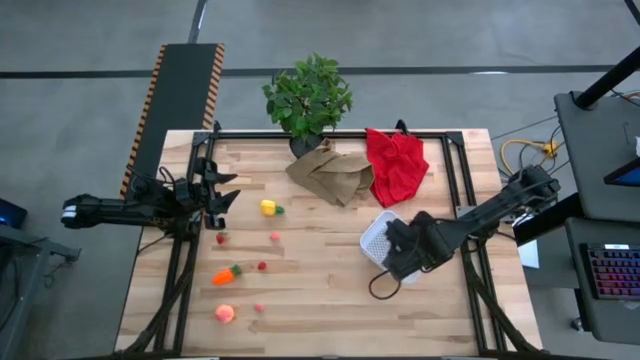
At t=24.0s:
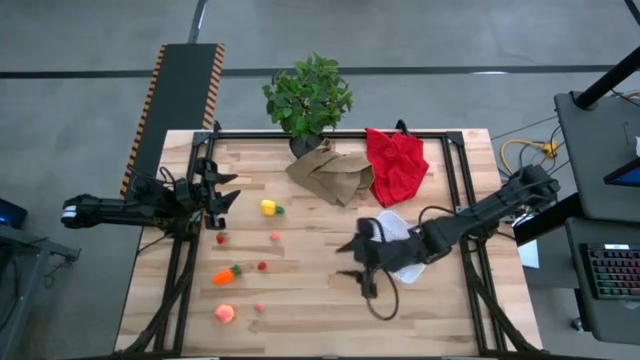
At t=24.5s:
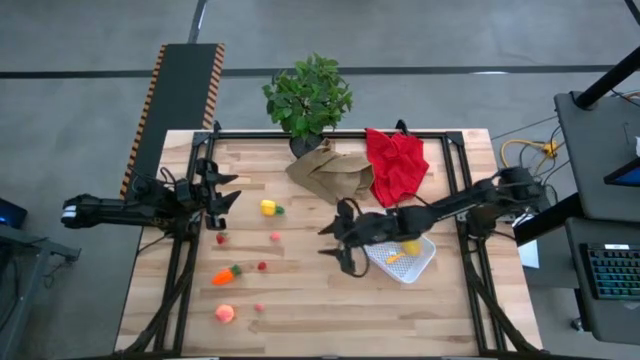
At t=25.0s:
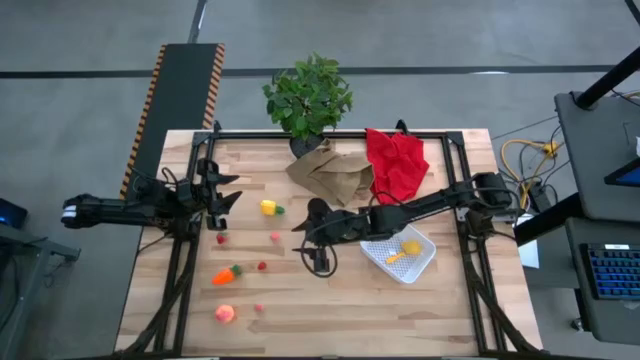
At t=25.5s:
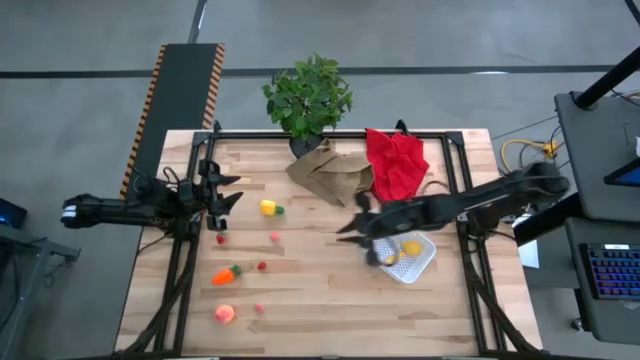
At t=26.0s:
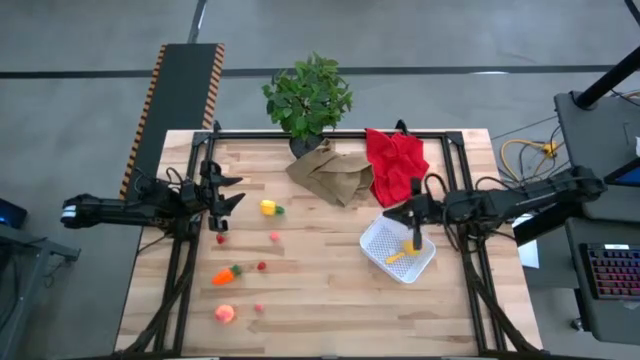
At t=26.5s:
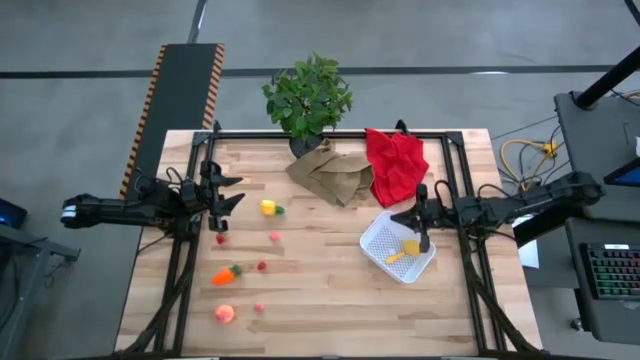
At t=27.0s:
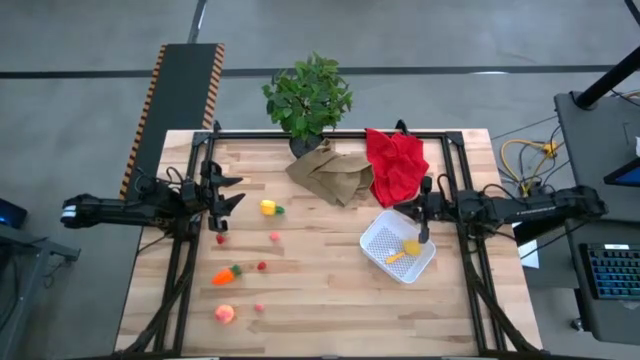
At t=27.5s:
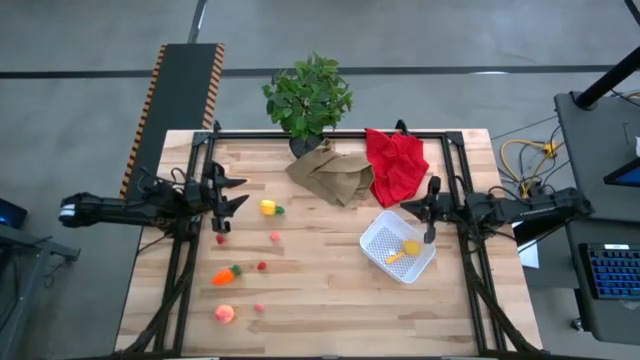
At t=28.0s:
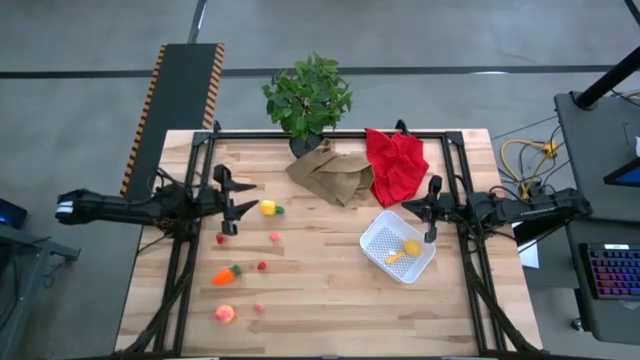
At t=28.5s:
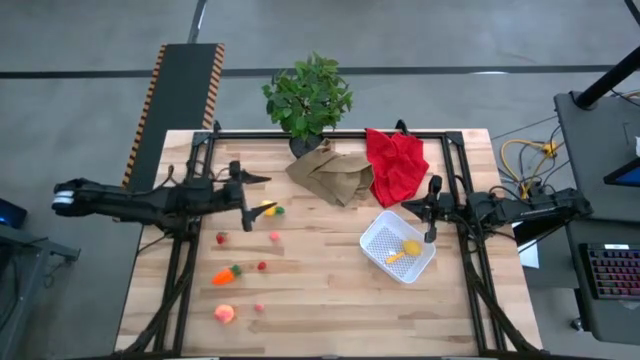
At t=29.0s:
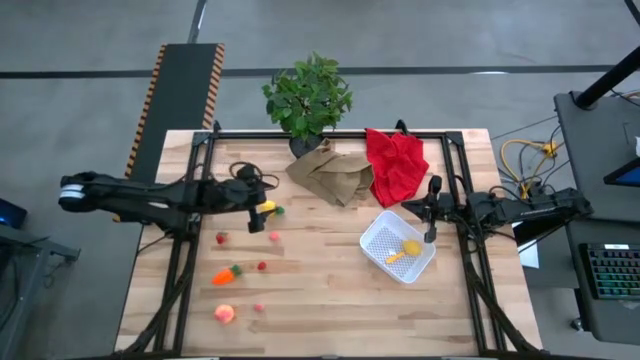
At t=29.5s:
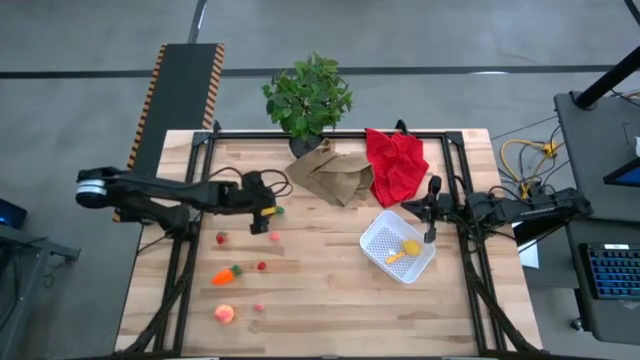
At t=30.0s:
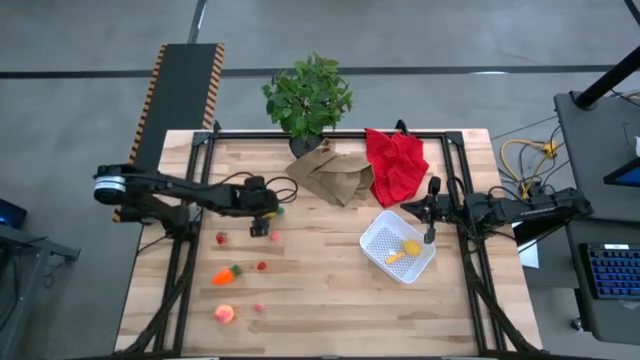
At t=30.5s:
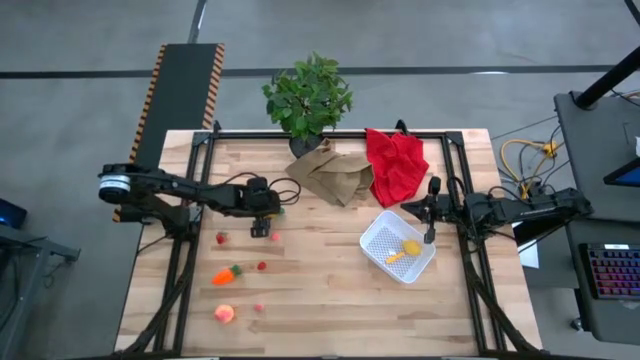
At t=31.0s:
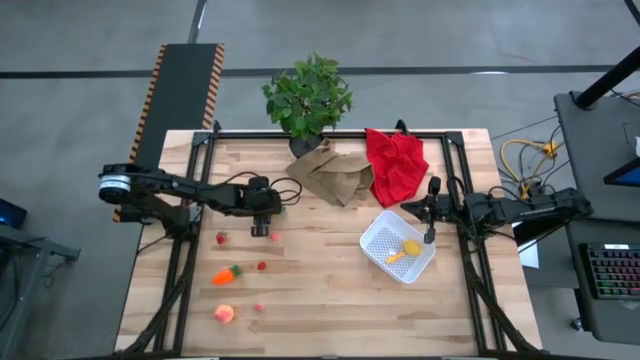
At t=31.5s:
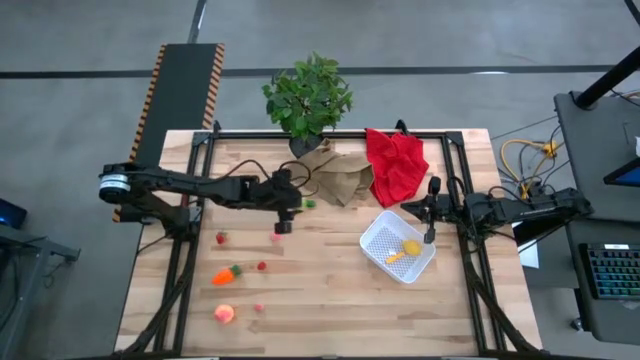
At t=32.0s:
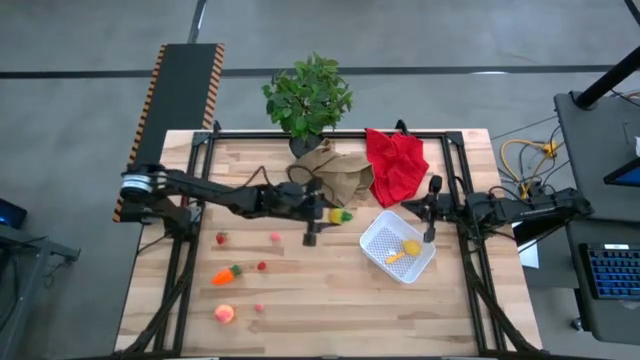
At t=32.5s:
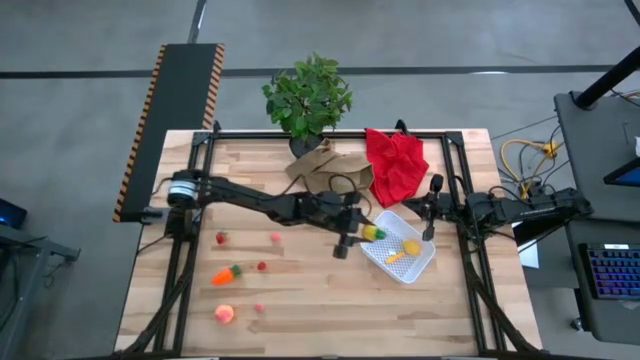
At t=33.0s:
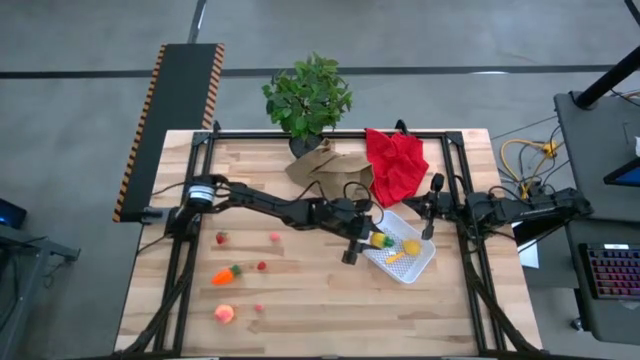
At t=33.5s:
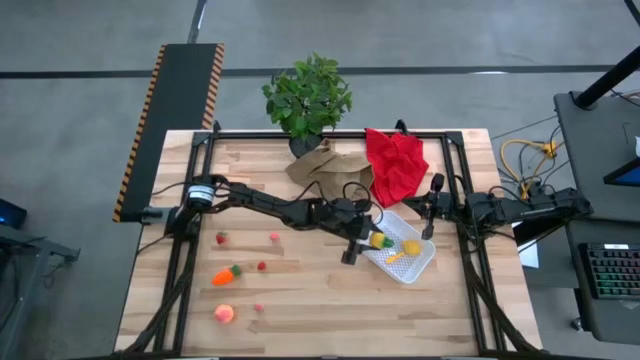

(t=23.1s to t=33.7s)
Task: Pick and placing Produce into tupperware
Put the yellow pineapple into the white bin

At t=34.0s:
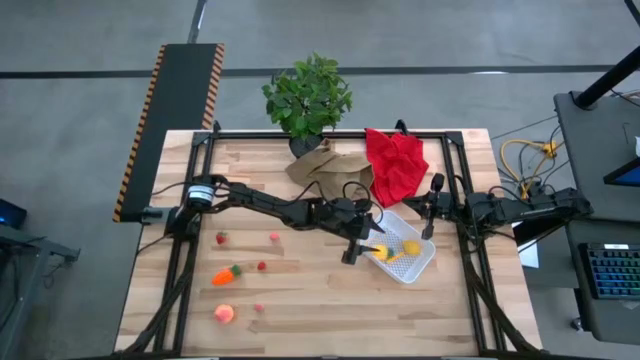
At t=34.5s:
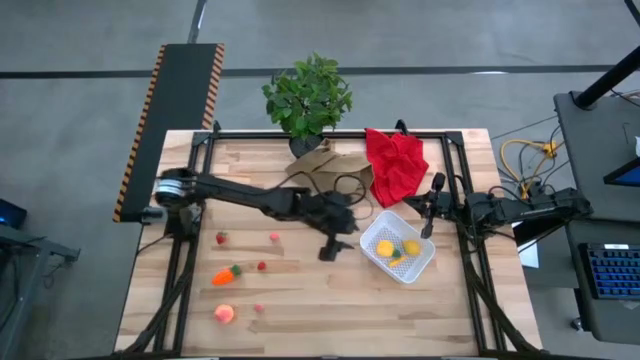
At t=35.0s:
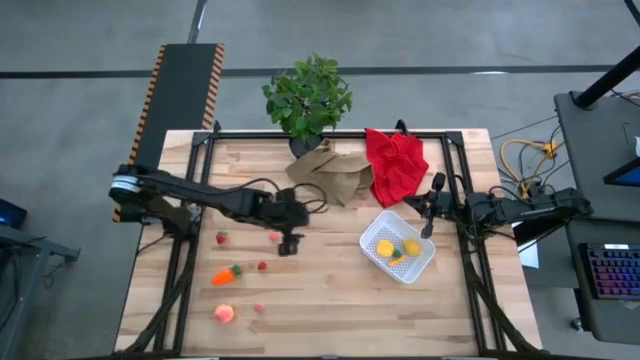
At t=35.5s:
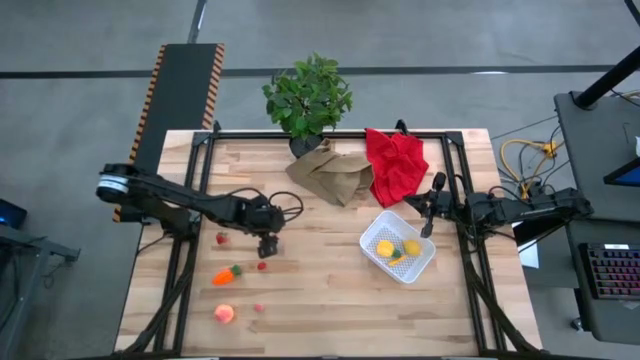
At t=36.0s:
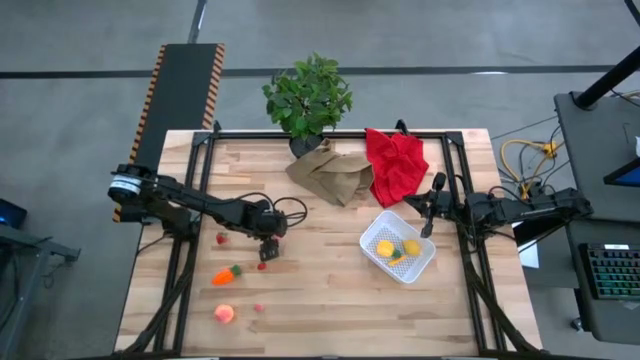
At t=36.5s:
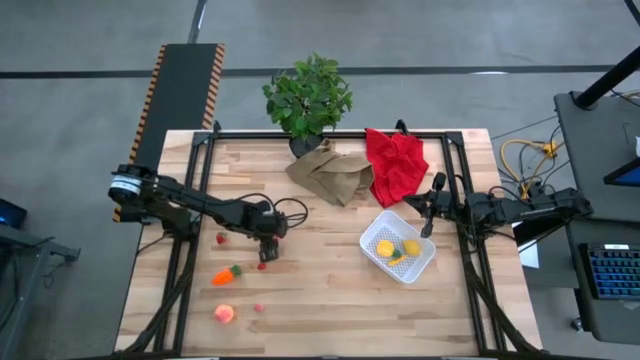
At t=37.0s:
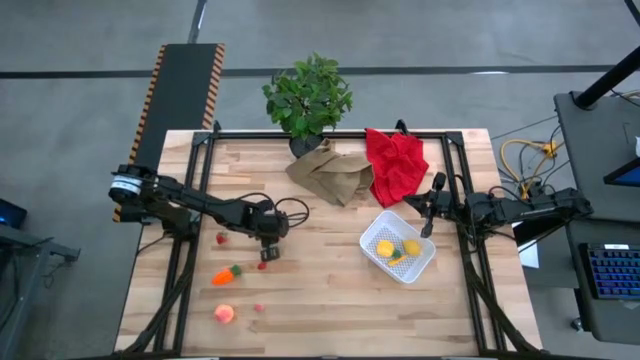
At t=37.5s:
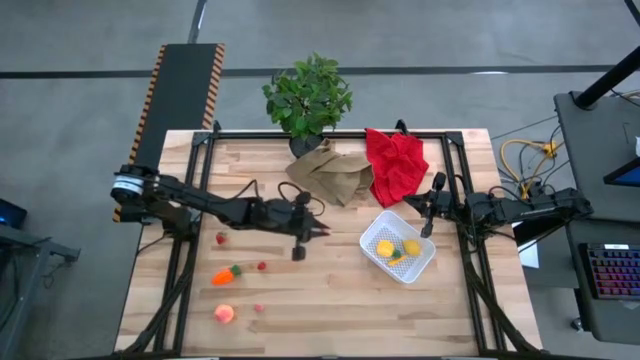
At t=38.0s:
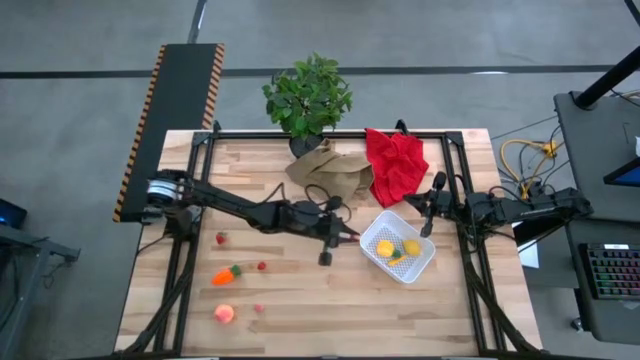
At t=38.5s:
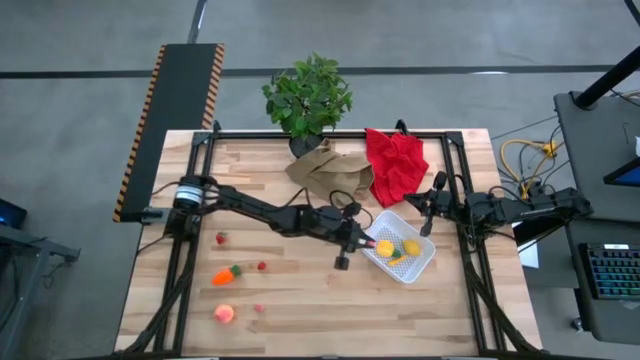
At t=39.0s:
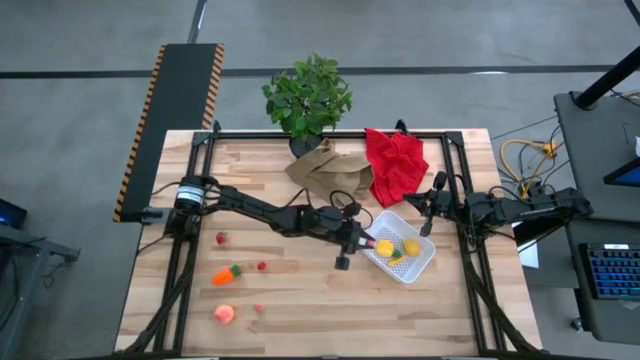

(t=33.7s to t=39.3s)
Put the top small peach into the white bin

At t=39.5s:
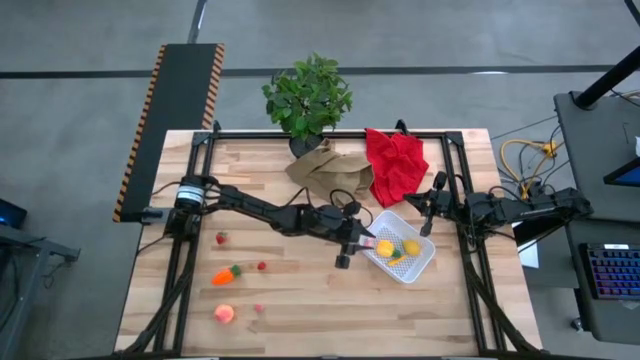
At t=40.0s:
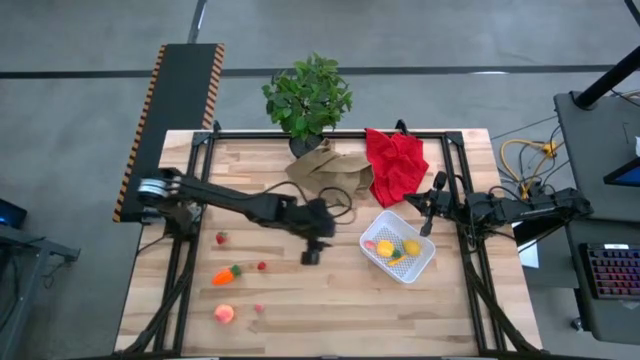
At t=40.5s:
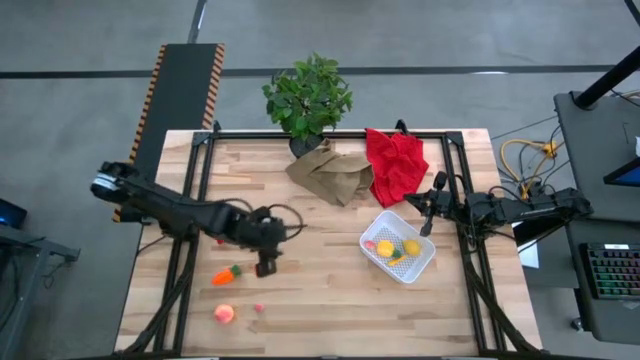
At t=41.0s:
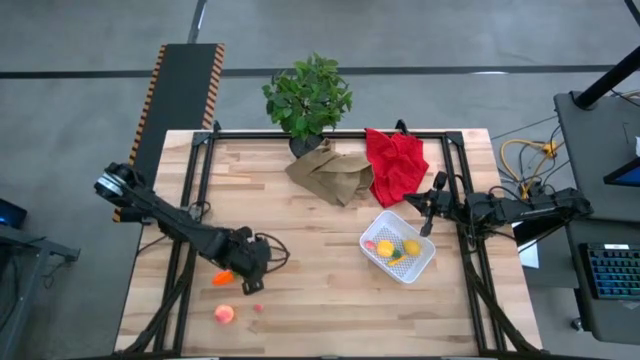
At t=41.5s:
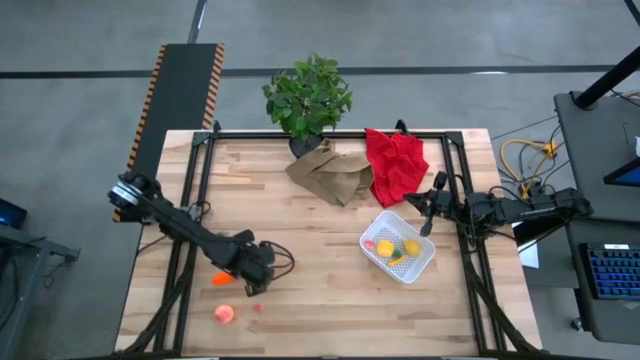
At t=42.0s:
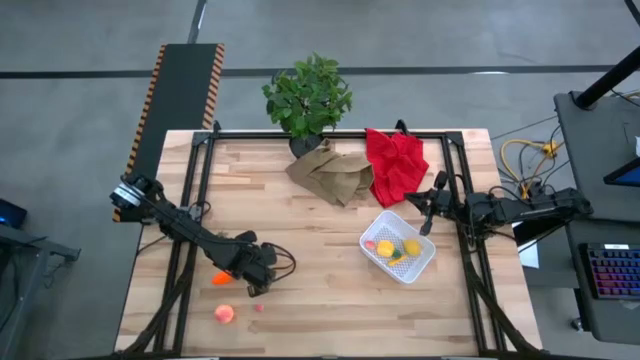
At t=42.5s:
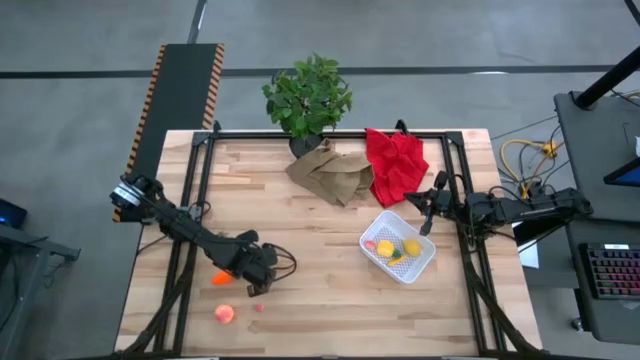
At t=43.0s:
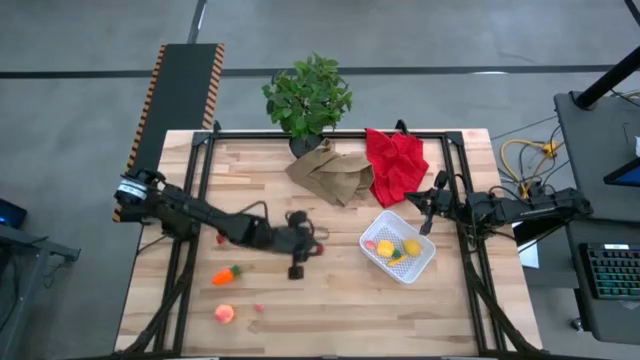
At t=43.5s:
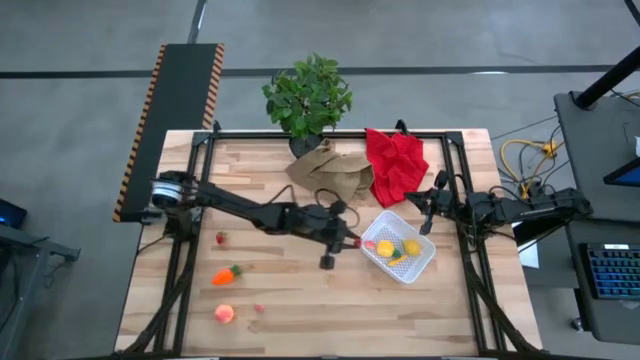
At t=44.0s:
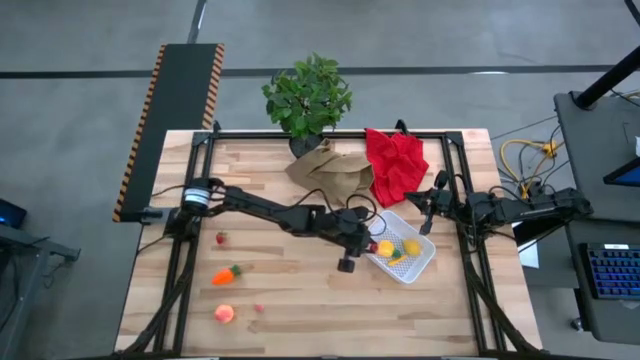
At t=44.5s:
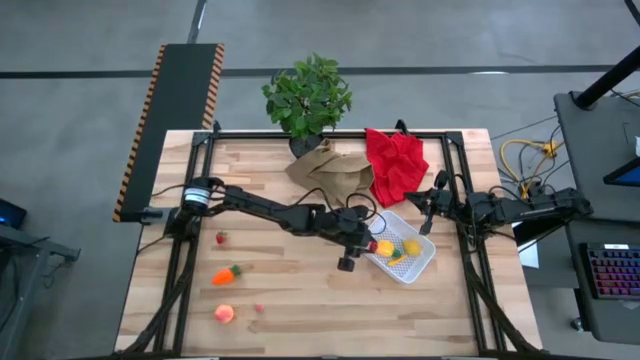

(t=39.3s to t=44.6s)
Put the red raspberry into the white bin
